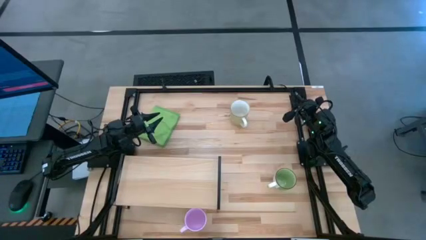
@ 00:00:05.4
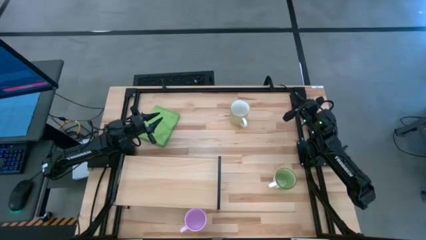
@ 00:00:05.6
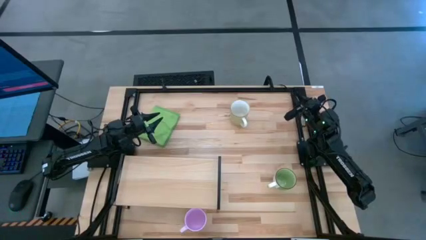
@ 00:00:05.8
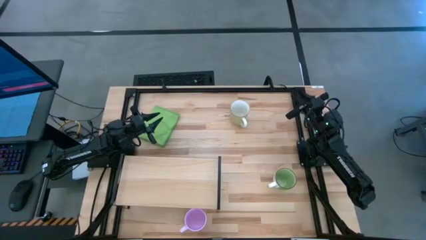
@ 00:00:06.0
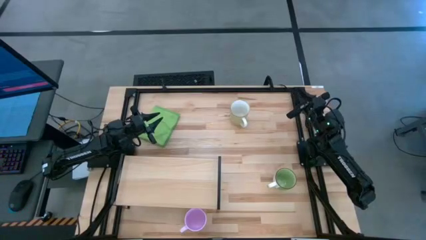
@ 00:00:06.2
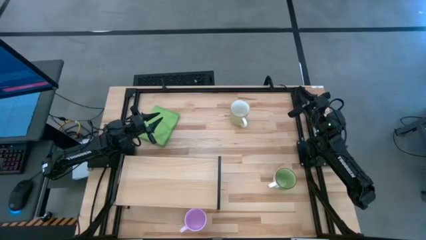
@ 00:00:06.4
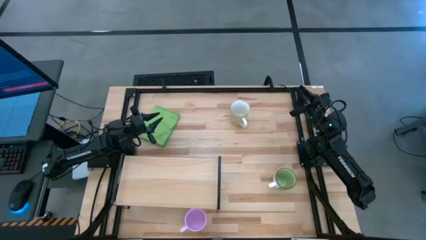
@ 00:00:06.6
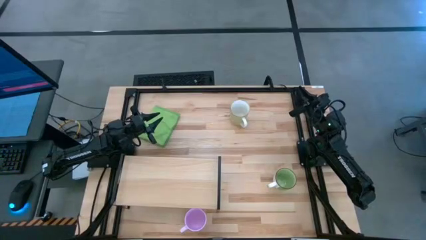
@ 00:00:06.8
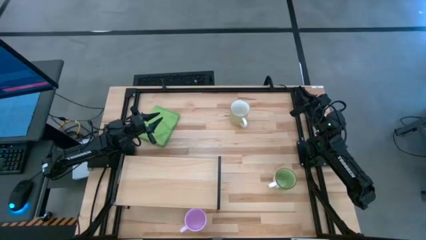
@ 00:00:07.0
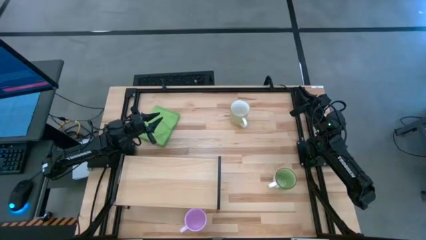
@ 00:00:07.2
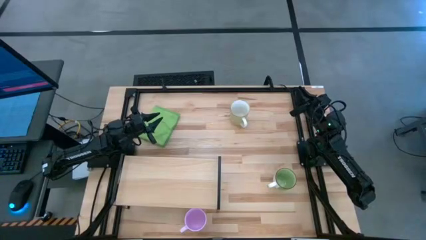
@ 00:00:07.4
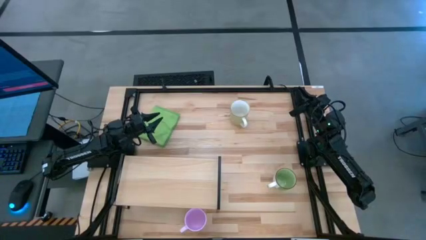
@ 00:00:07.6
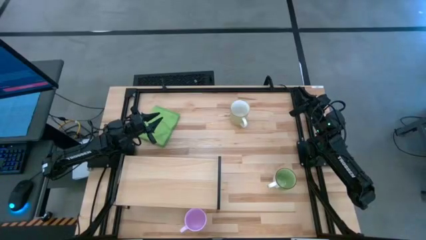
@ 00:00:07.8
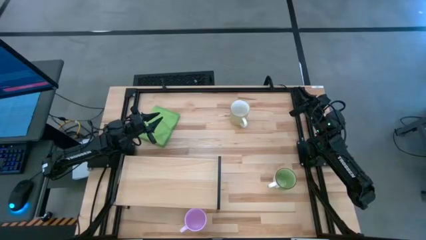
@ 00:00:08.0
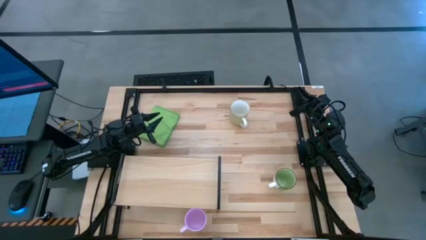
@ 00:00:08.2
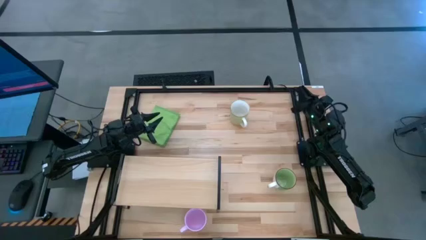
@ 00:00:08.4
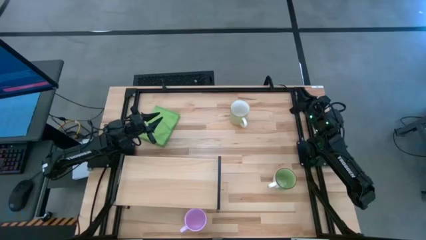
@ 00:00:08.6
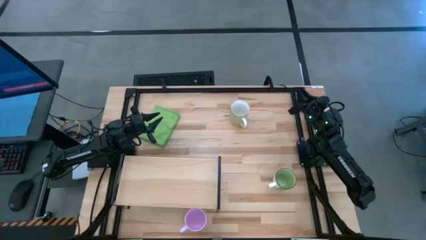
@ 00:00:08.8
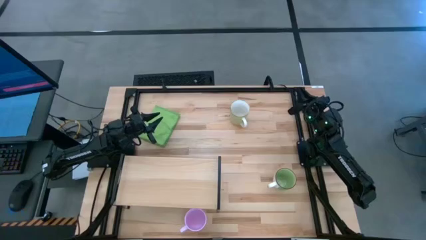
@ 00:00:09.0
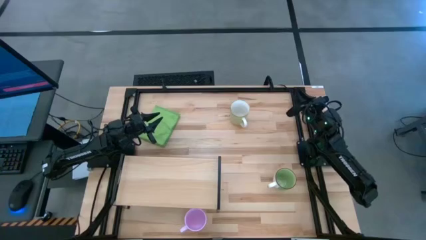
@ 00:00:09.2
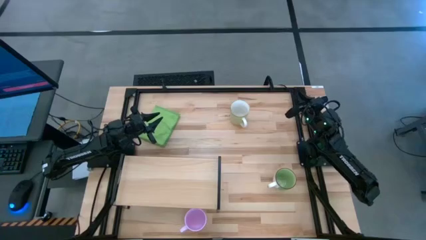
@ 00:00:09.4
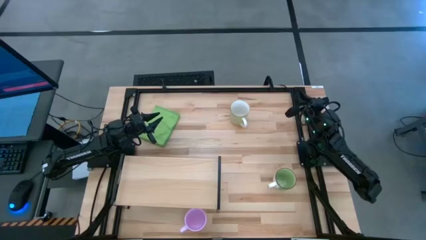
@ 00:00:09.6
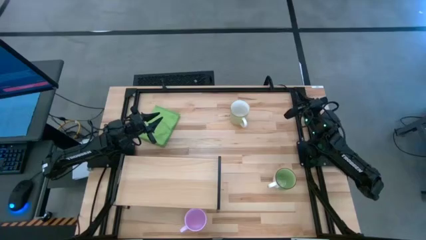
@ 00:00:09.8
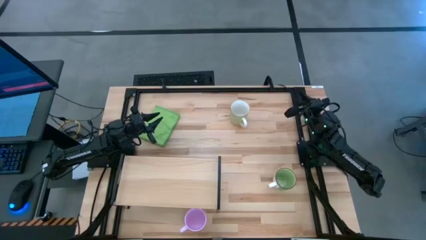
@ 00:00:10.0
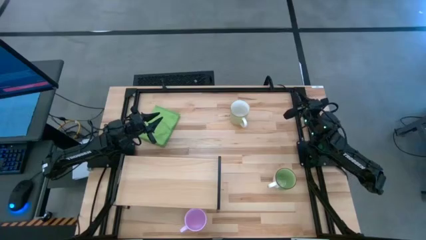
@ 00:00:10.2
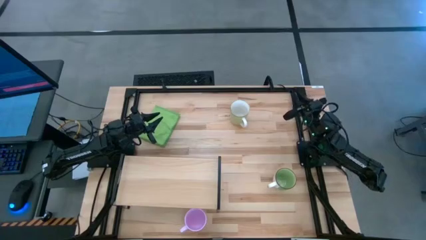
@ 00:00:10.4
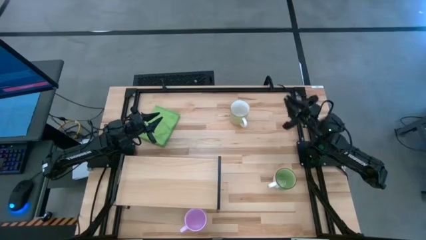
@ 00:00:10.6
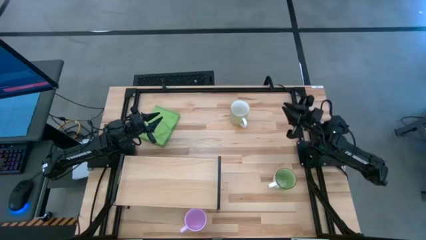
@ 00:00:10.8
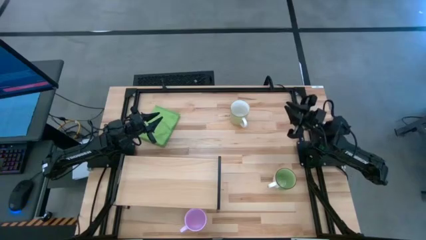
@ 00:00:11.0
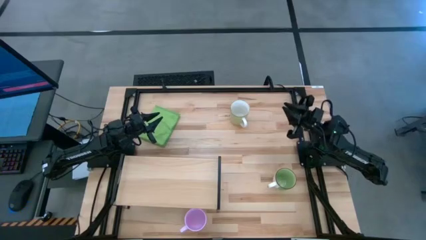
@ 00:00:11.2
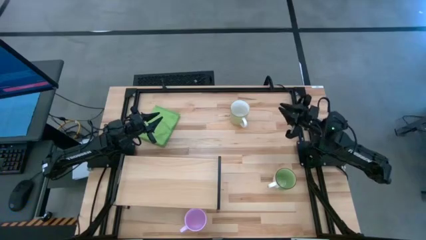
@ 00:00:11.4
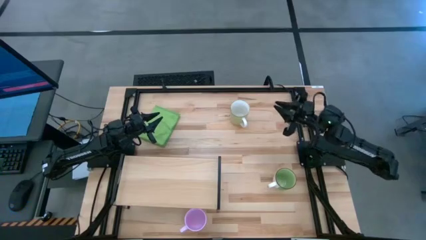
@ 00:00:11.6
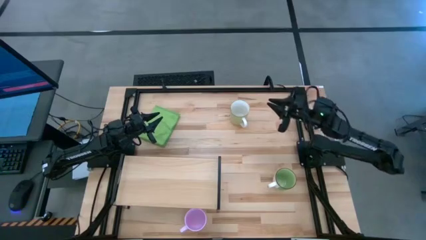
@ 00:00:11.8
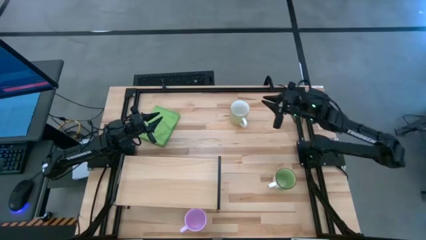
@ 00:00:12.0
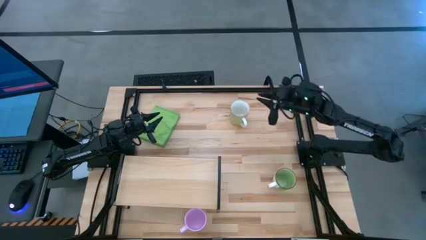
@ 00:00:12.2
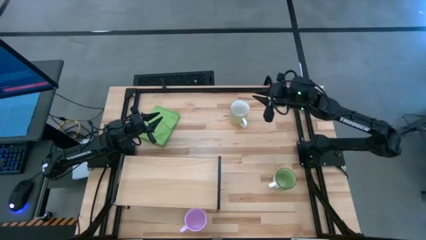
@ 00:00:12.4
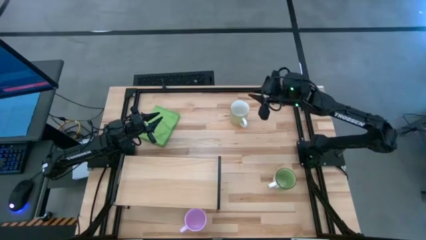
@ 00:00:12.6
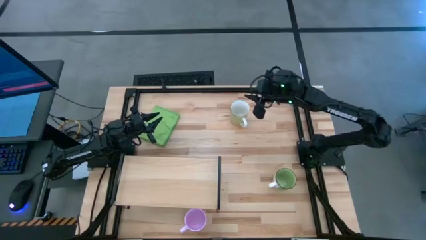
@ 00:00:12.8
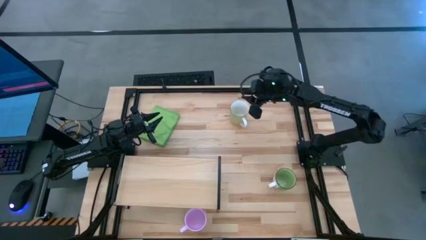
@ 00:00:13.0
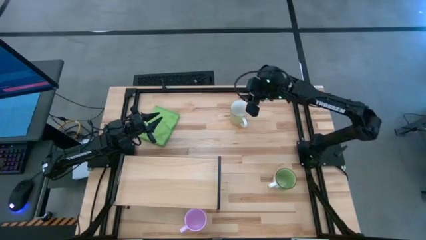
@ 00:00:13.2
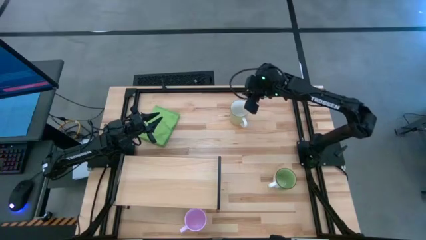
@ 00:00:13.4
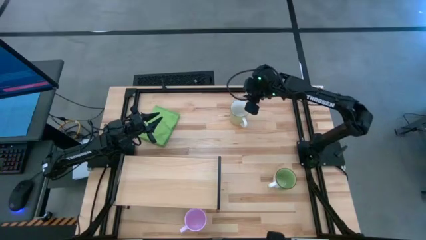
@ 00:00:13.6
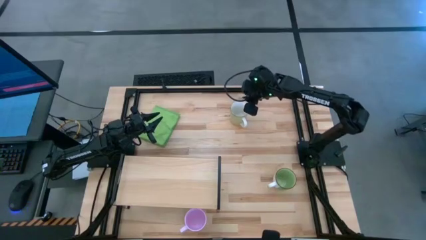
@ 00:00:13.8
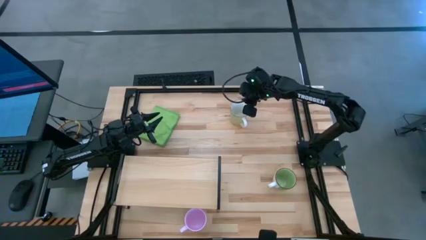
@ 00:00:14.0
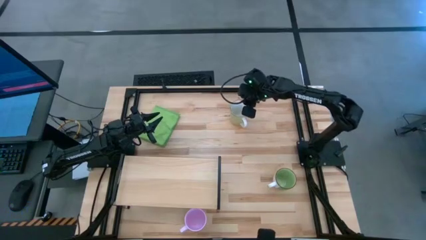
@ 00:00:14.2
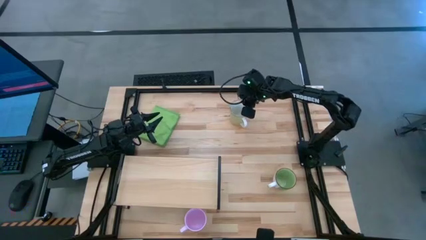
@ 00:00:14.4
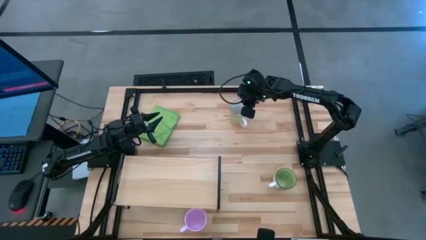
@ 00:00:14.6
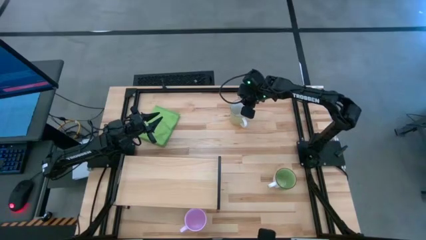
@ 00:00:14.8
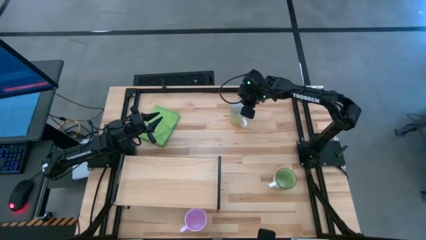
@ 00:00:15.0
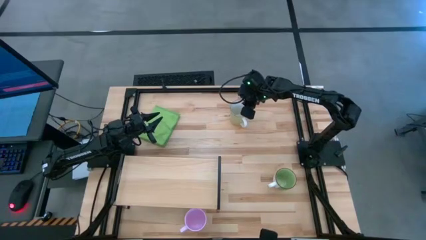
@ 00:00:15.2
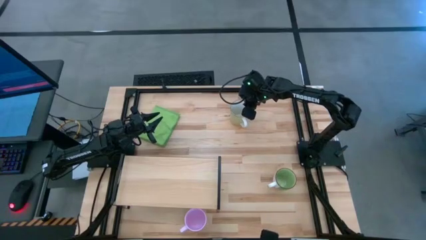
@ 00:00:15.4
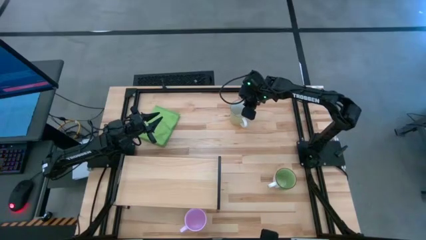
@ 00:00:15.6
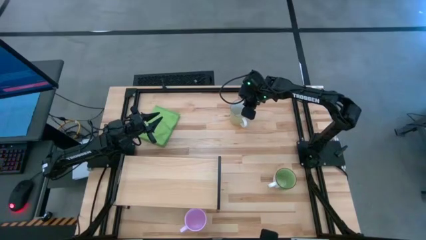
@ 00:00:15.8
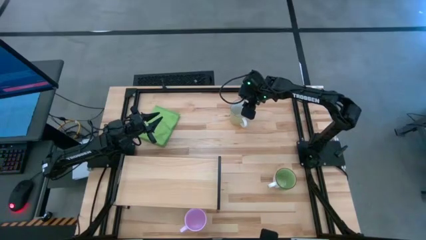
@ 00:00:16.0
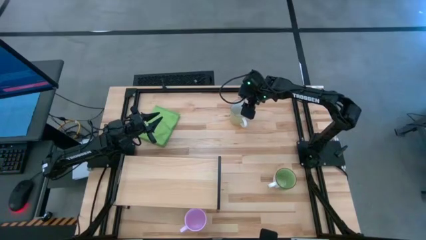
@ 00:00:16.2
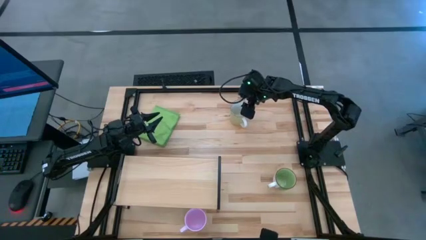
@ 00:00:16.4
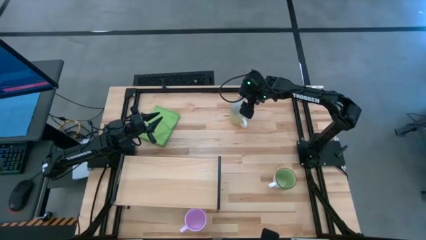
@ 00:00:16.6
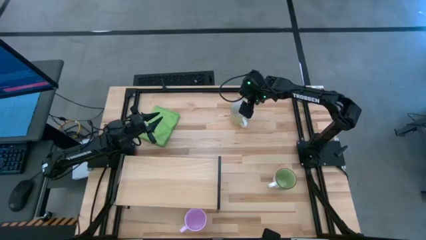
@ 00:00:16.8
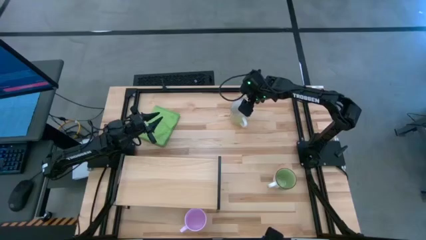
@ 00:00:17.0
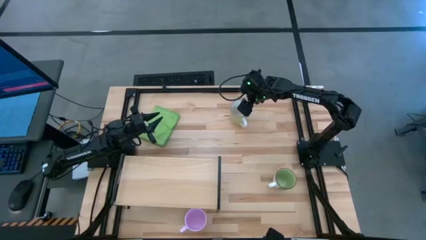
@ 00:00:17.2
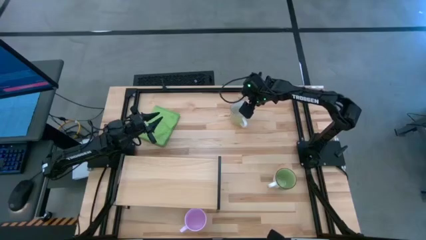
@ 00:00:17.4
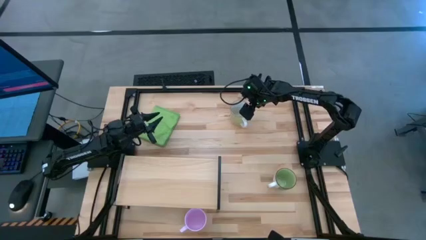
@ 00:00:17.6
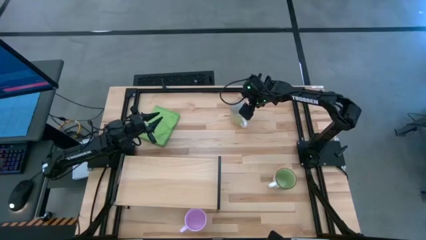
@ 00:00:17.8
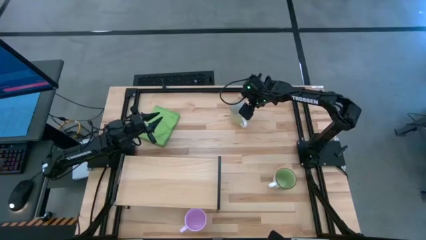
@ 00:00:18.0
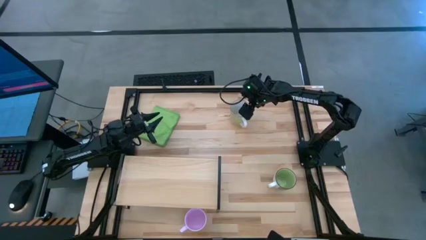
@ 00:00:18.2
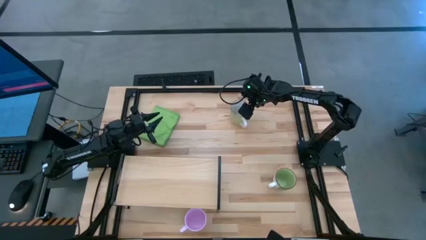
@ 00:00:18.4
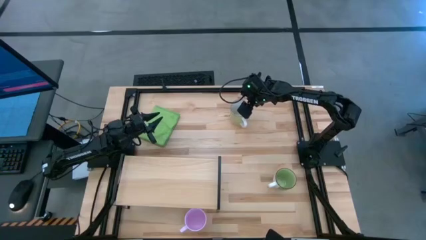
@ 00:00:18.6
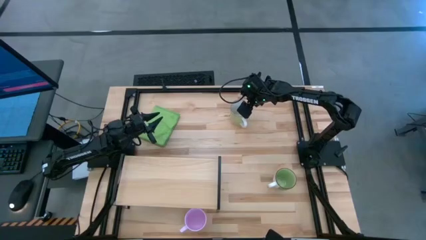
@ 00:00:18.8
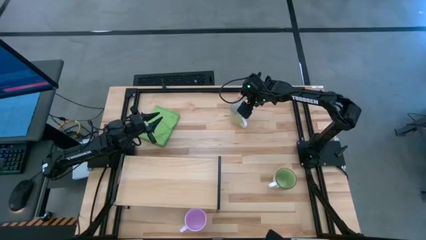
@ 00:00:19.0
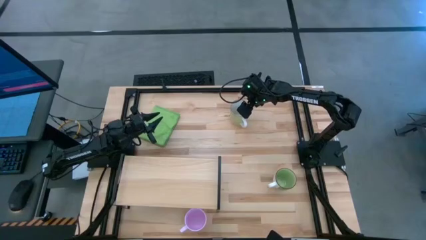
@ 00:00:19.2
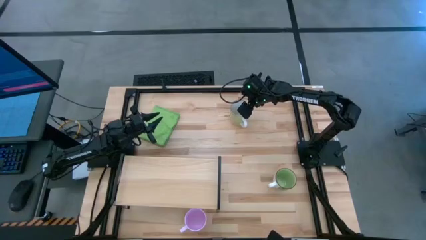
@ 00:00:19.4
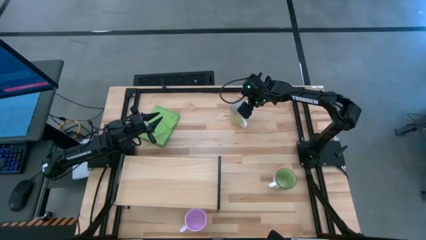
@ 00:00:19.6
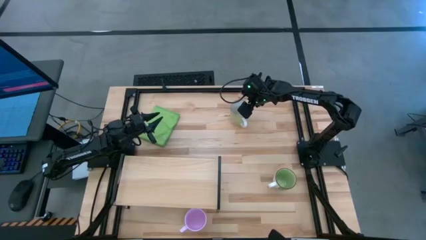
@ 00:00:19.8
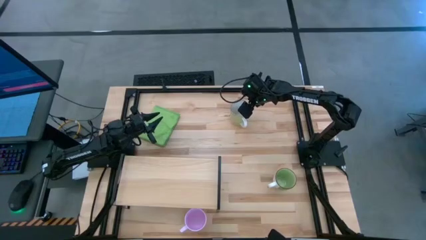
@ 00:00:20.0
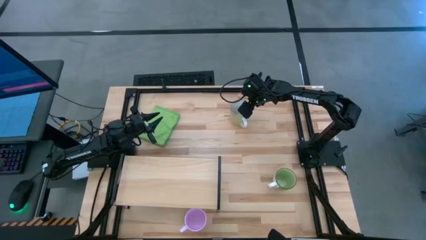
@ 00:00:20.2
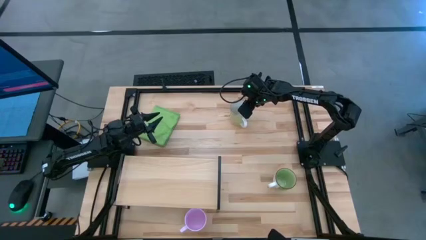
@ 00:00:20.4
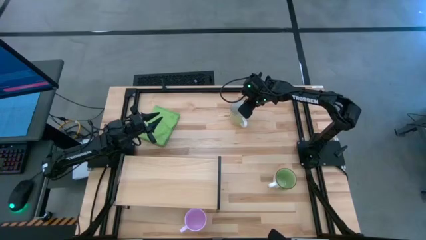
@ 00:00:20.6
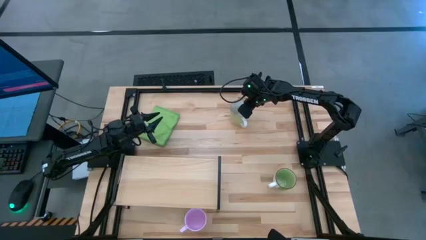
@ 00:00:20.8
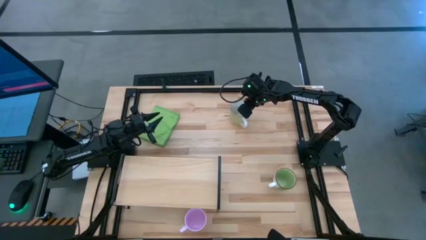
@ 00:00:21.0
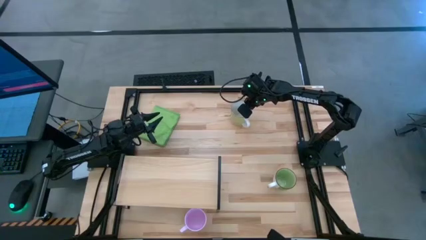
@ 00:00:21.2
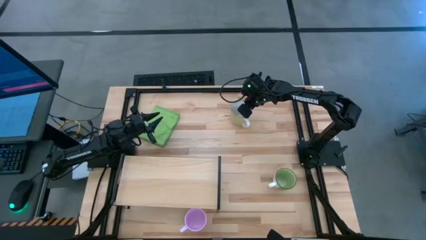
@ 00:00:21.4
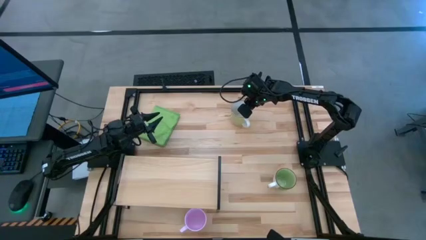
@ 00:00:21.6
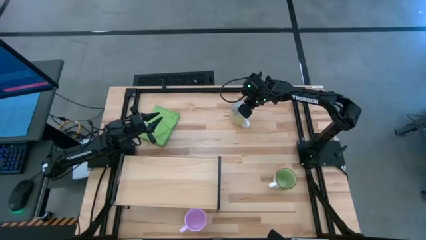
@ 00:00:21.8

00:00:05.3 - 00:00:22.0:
Task: Stack small to large cups/mugs on shelf
Put the light green mug on the shelf
